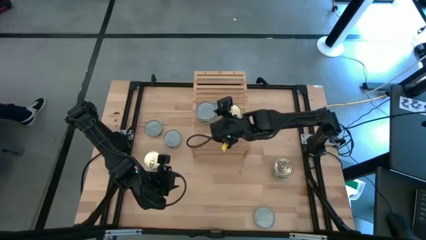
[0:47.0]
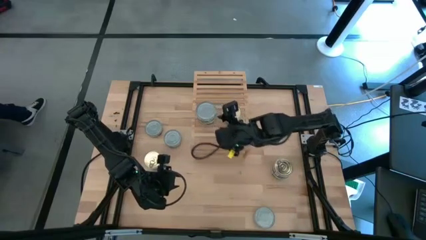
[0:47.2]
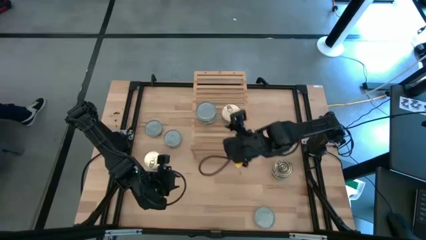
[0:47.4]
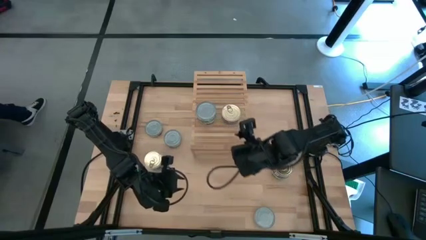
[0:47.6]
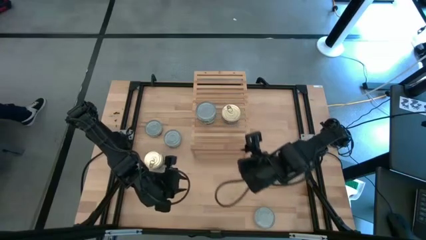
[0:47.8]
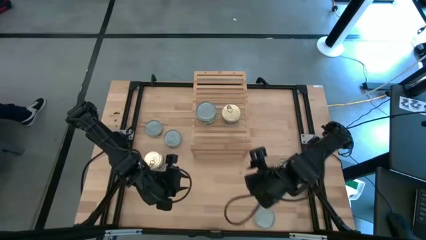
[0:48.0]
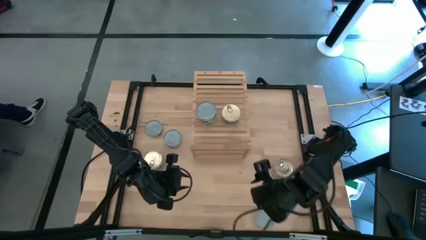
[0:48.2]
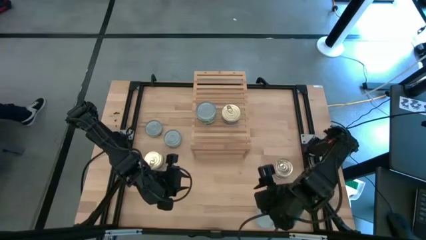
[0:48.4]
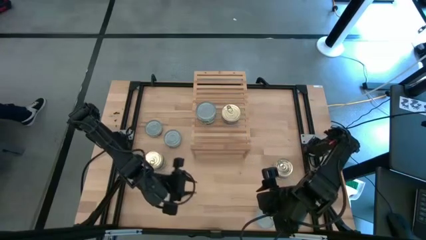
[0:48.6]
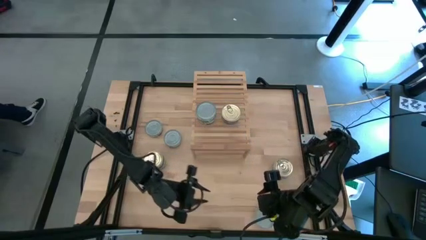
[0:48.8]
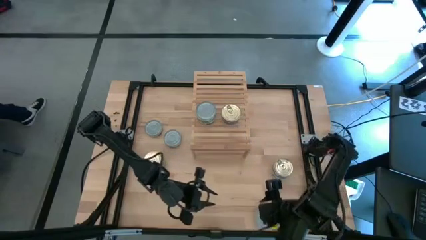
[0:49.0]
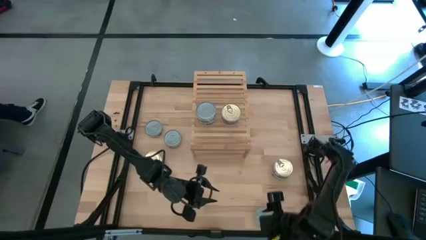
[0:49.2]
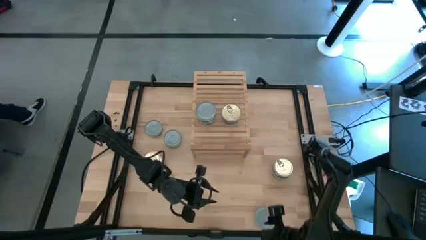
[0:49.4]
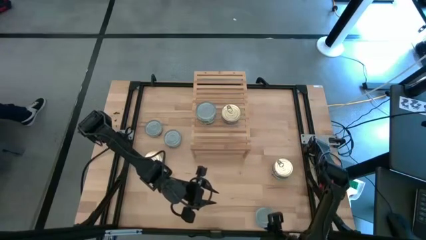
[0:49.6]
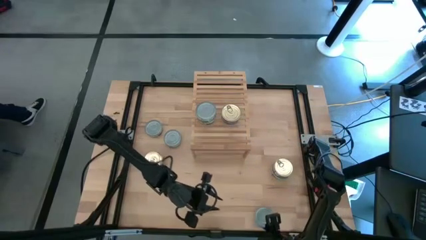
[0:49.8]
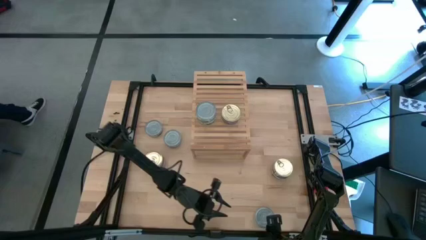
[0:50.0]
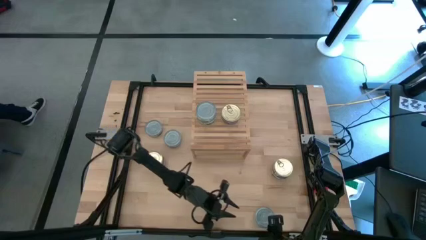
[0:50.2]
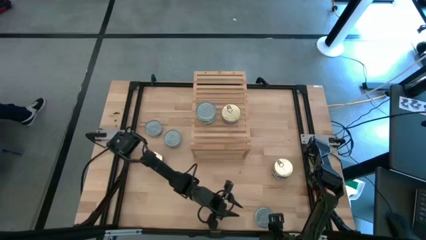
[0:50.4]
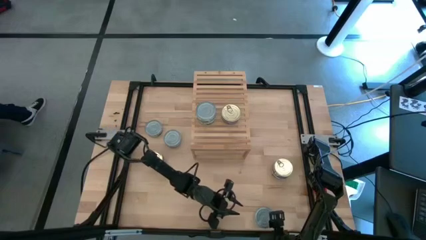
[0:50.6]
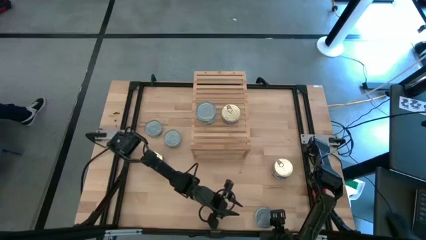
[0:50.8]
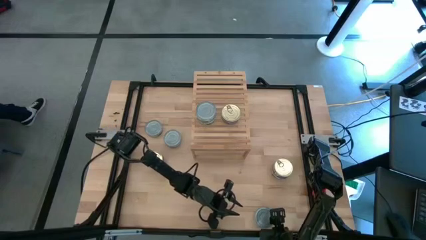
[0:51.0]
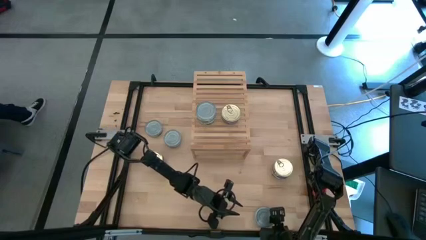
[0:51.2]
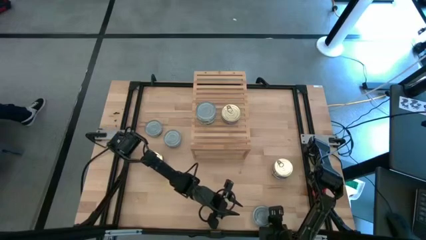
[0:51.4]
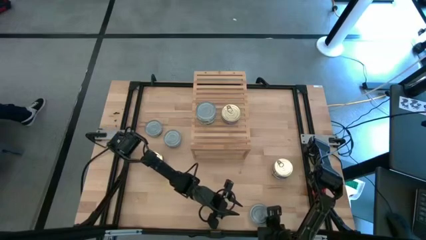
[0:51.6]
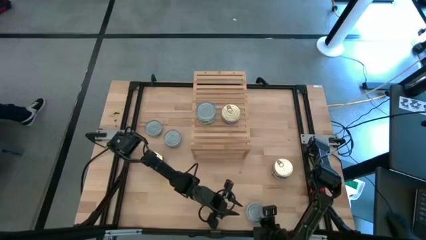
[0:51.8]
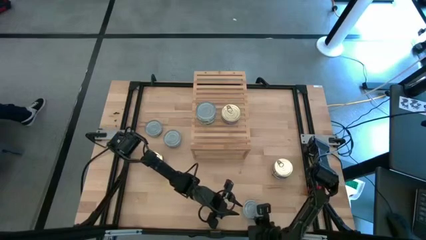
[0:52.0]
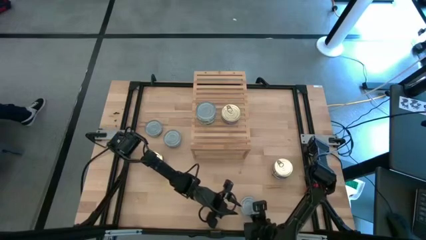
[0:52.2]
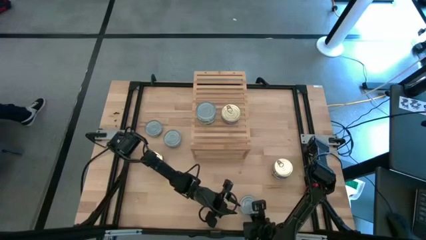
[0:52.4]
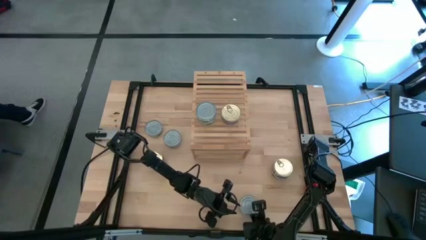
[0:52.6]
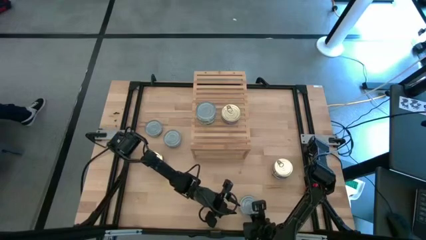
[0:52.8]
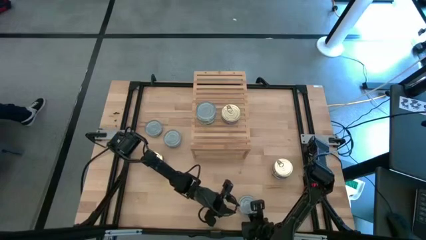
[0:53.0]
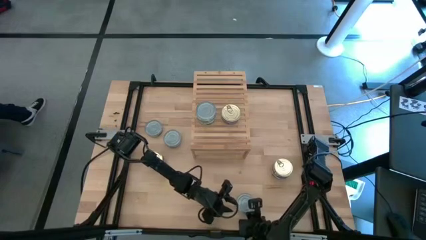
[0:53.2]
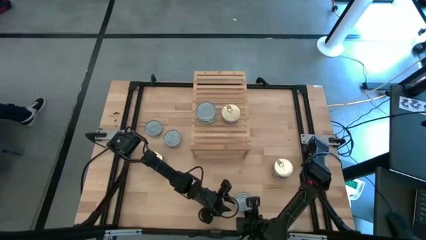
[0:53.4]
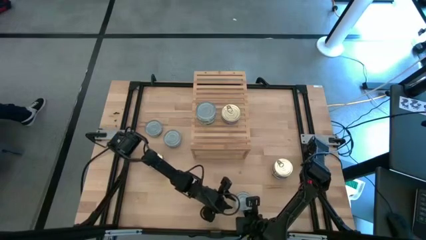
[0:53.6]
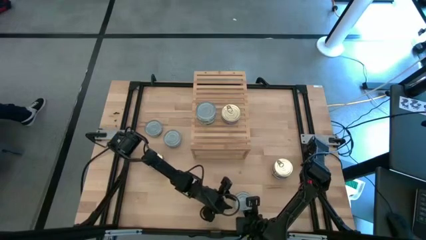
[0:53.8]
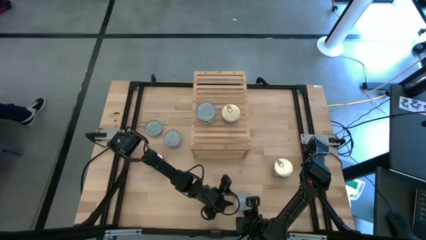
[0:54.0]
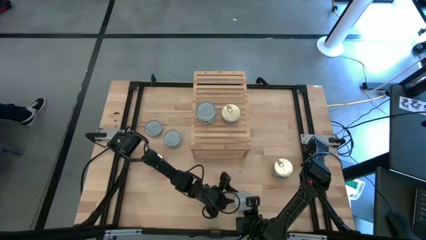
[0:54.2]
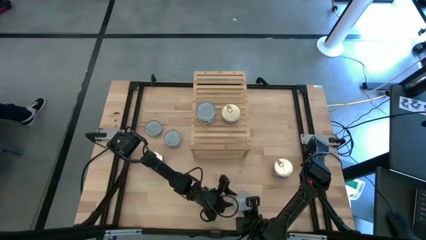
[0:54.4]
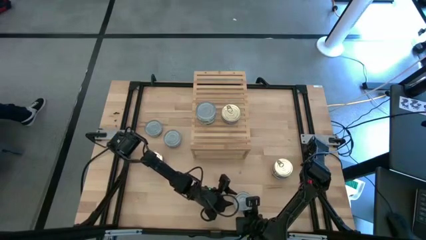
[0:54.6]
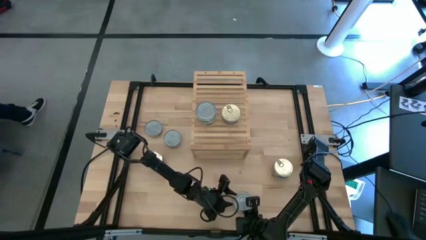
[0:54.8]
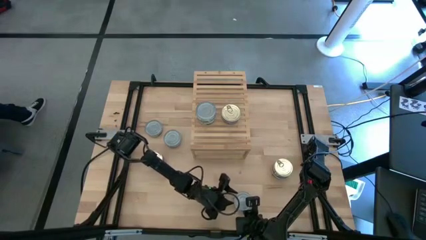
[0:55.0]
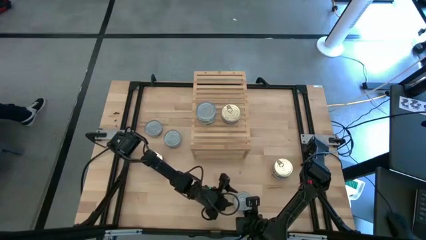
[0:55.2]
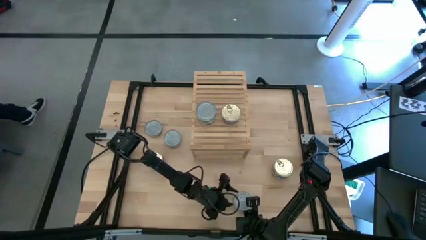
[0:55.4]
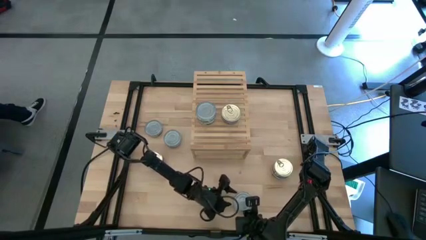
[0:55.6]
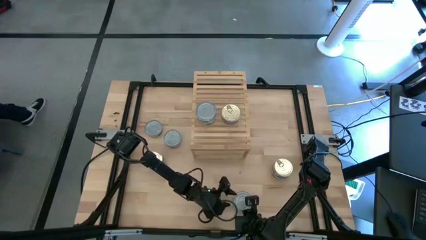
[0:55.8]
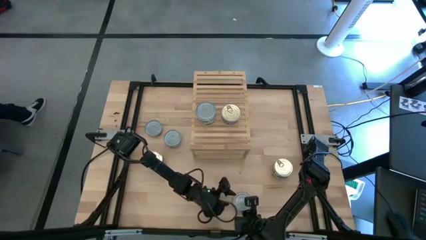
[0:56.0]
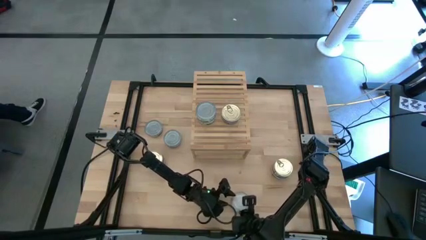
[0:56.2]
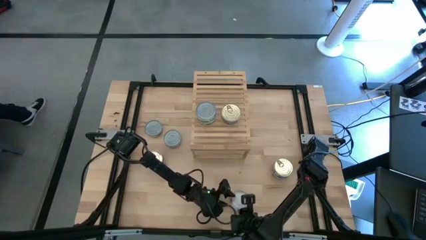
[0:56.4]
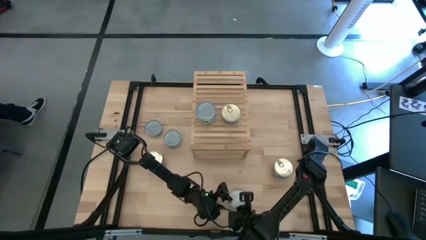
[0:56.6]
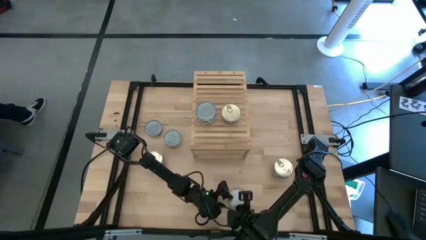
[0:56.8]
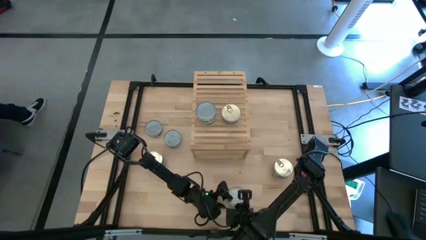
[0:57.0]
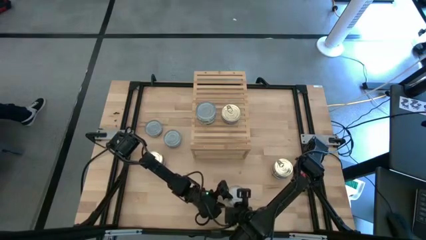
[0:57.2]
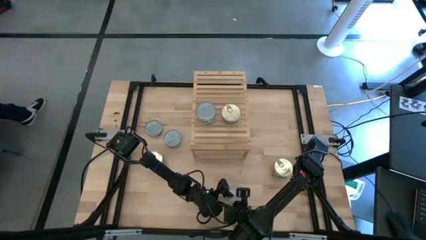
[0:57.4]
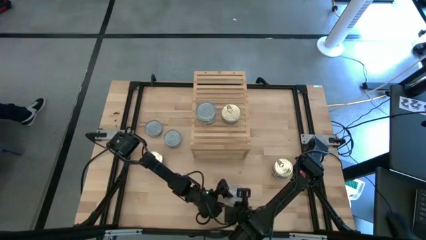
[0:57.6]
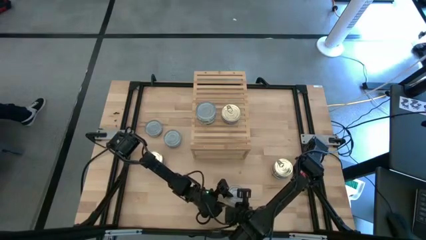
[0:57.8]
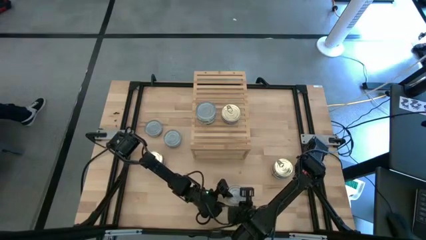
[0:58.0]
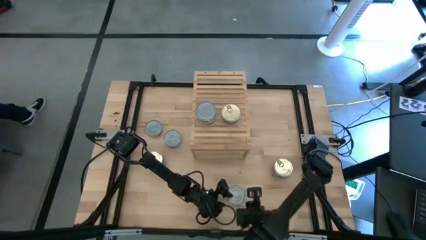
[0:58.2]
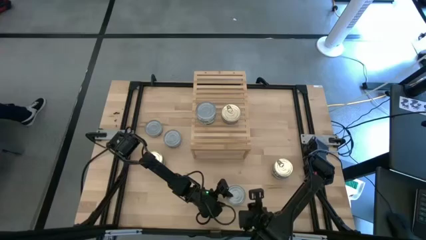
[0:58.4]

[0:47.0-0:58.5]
Task: Stack canned seafood by type on shelf
Stack the green tuna can on top of the green tuna can on the shelf

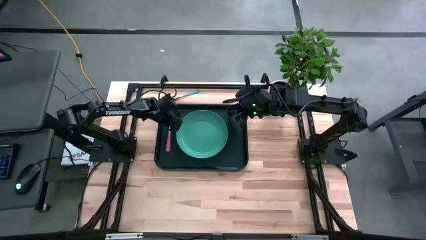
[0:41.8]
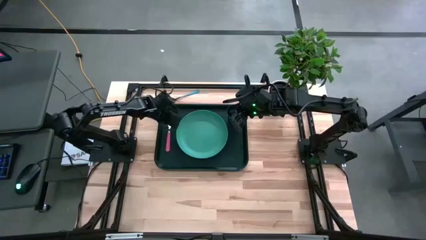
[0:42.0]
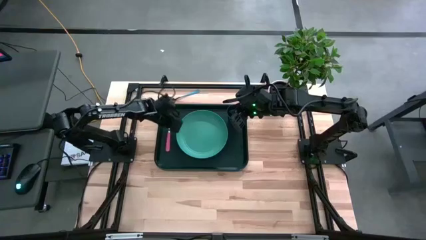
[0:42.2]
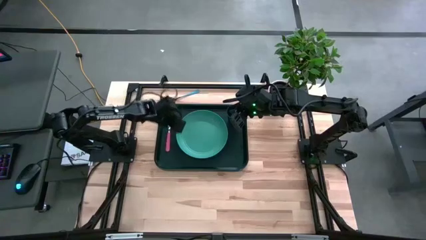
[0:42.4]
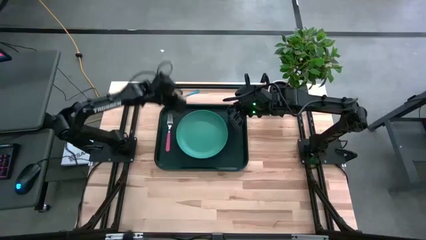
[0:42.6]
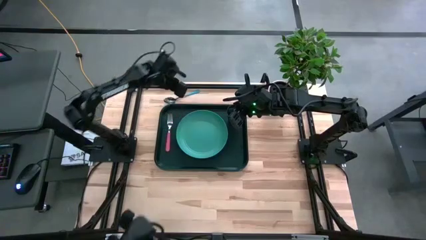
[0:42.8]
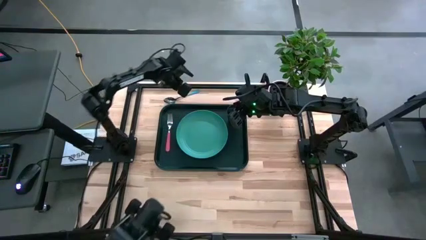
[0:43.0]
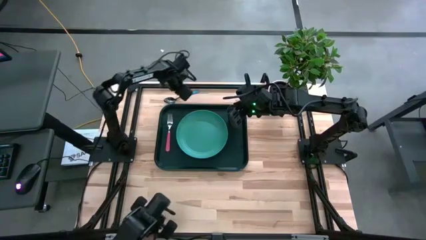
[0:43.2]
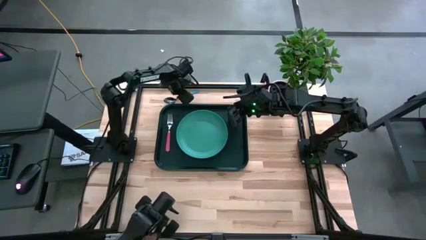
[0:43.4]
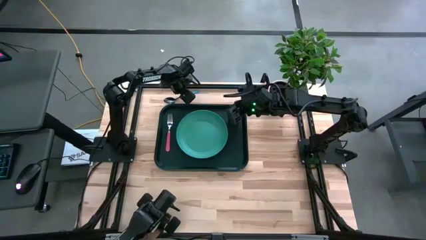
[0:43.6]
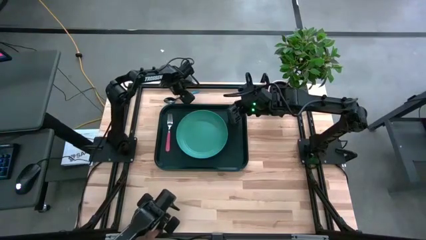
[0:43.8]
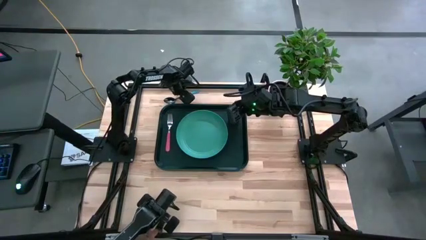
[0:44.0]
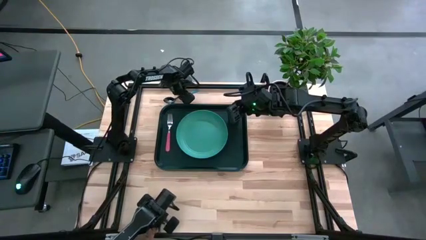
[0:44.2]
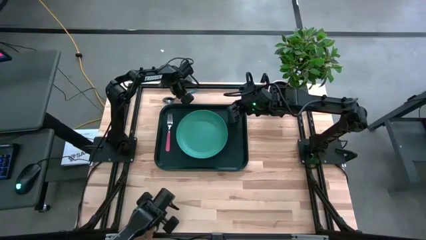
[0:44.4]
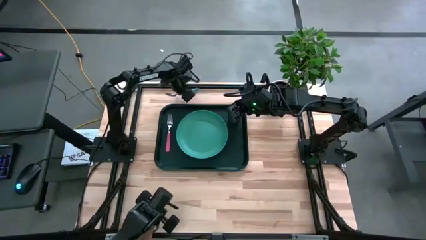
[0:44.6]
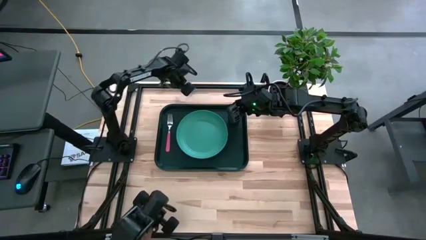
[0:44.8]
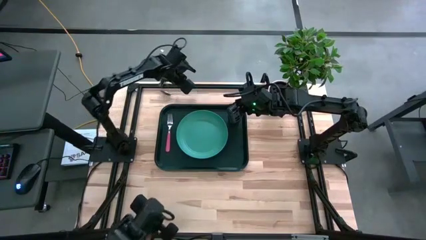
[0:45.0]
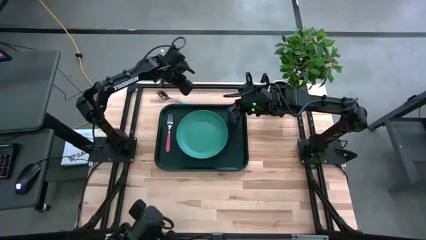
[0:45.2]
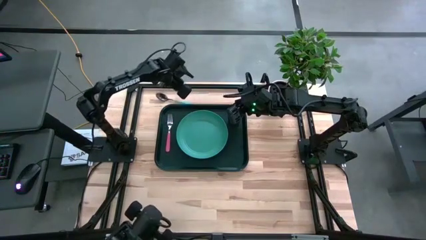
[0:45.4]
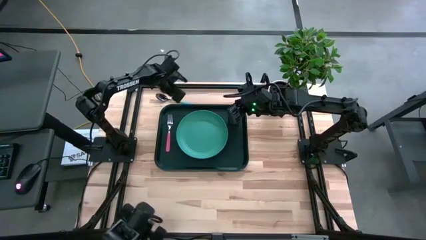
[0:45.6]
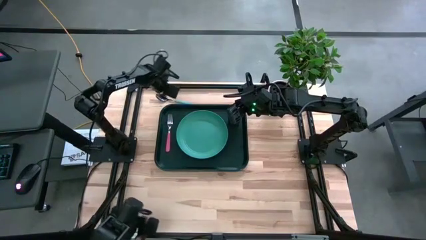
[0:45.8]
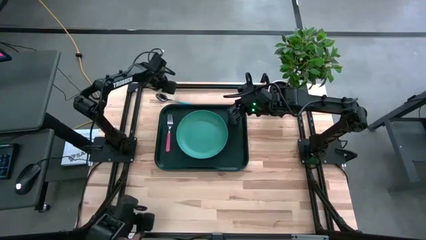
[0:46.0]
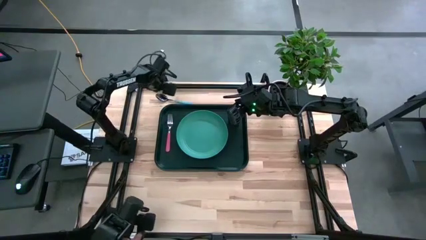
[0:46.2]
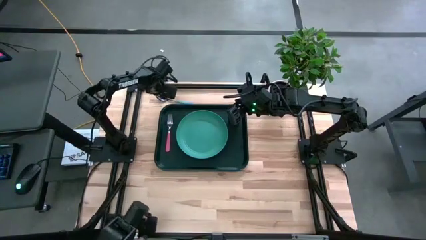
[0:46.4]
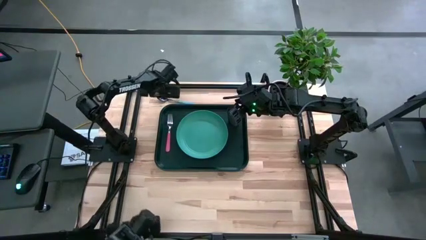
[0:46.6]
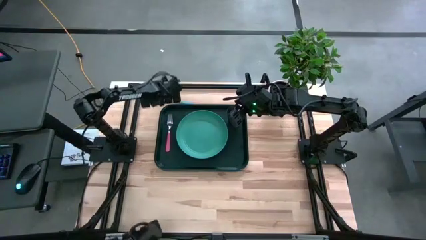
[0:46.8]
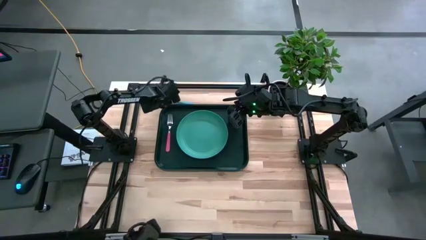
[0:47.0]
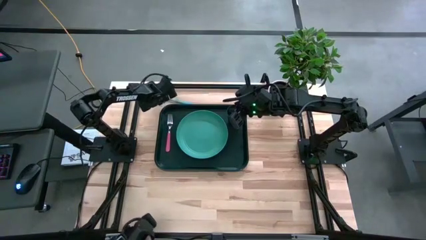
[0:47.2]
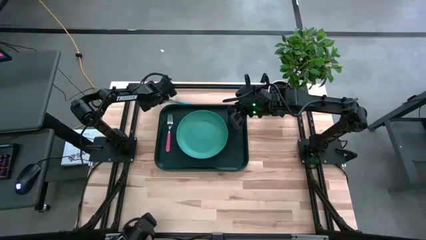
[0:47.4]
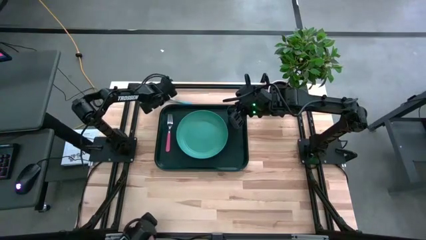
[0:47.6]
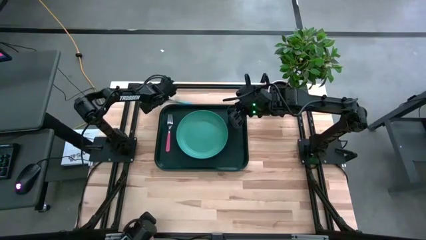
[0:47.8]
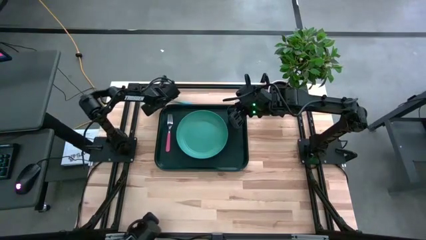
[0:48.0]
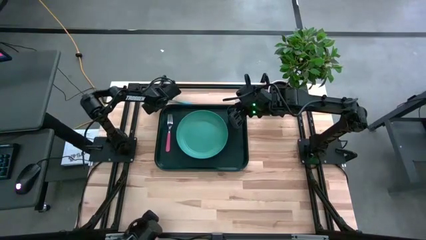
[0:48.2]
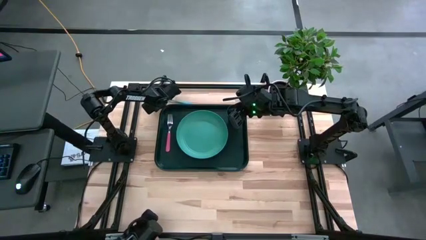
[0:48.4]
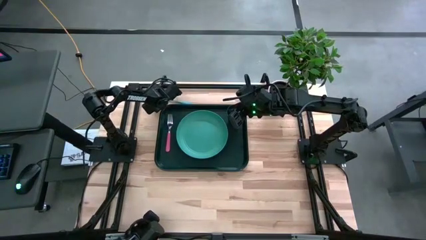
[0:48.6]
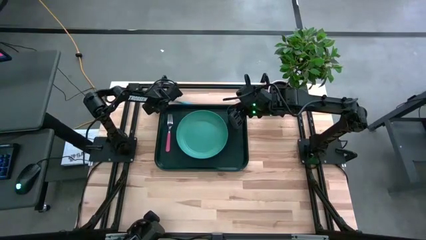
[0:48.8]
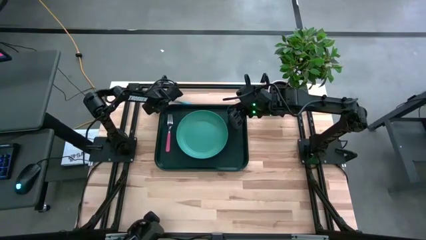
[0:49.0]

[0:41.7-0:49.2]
Task: Pick and place plate/cup/fork/spoon on tray
Put the light blue spoon on the black serving tray to the right of the pink fork
